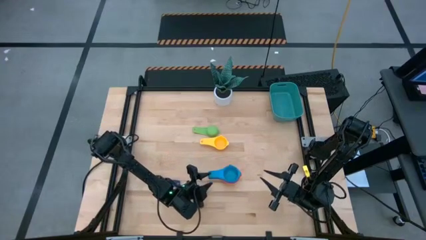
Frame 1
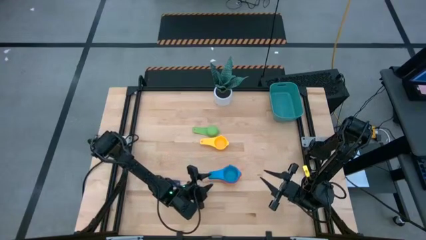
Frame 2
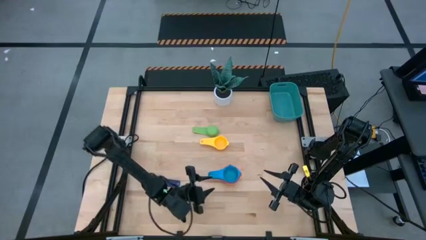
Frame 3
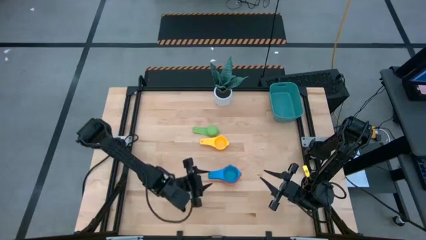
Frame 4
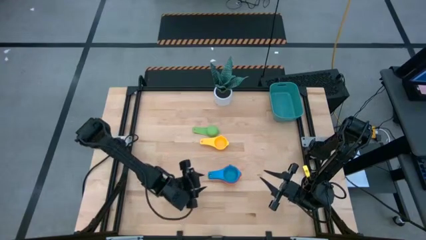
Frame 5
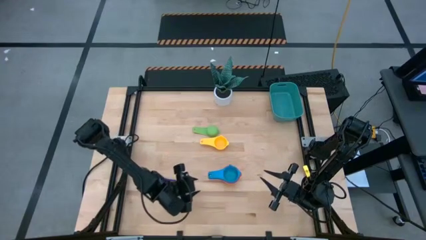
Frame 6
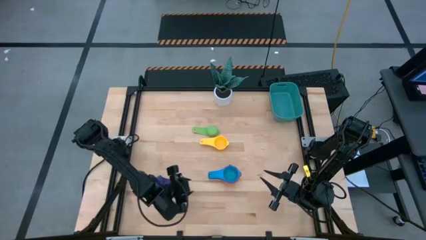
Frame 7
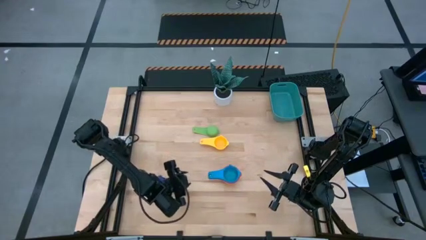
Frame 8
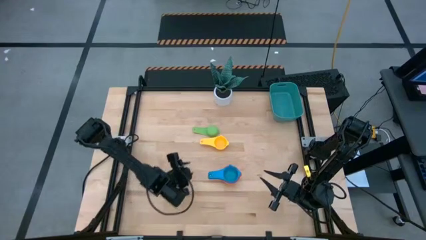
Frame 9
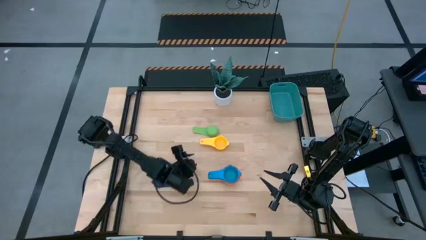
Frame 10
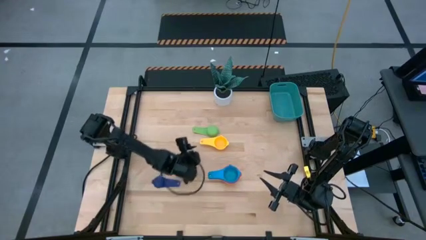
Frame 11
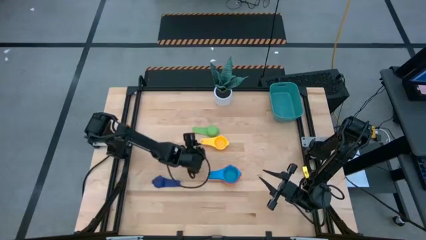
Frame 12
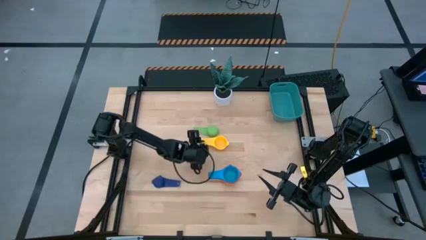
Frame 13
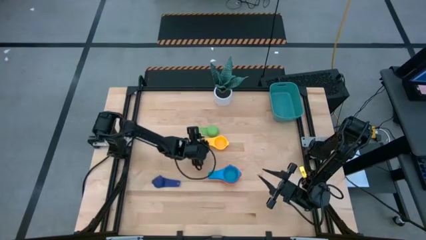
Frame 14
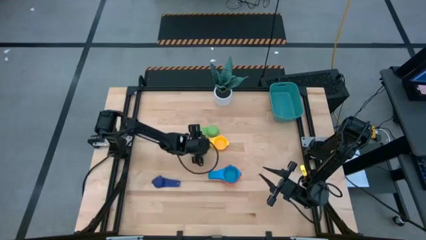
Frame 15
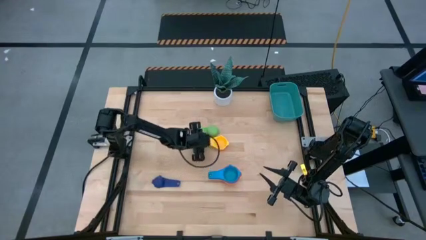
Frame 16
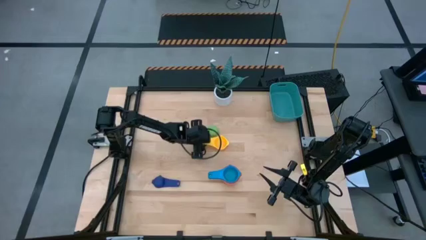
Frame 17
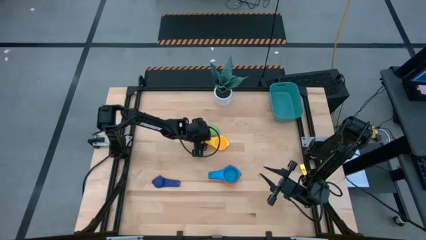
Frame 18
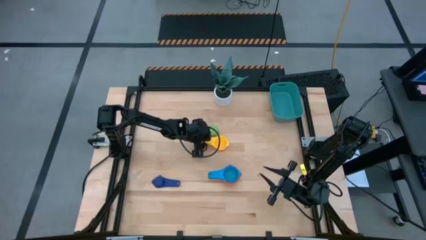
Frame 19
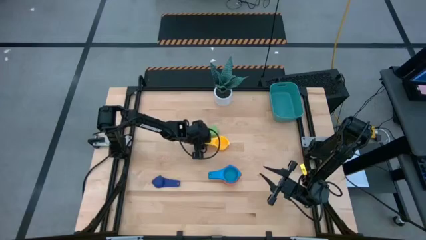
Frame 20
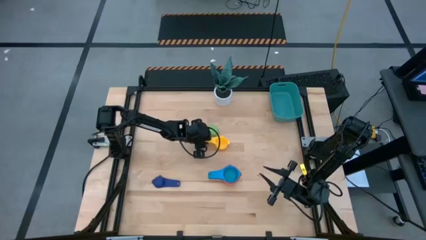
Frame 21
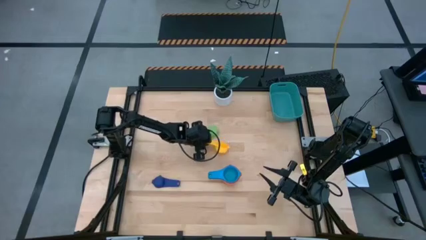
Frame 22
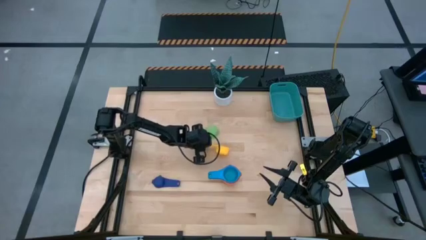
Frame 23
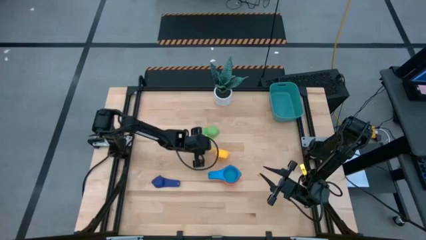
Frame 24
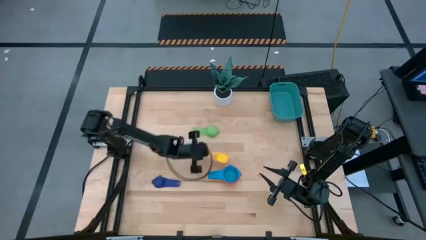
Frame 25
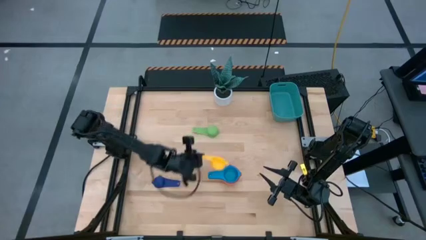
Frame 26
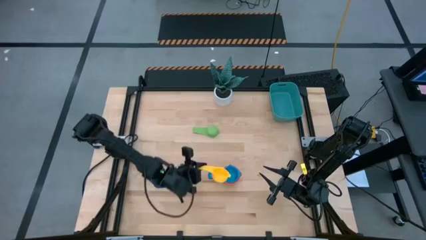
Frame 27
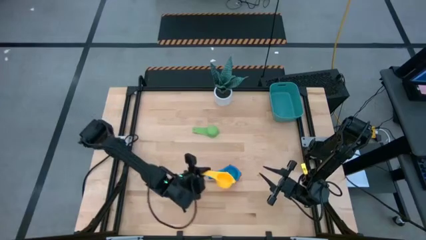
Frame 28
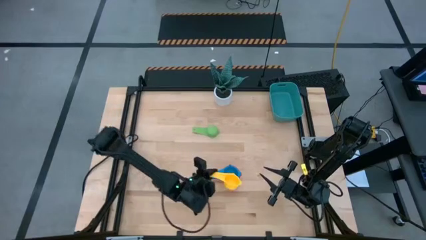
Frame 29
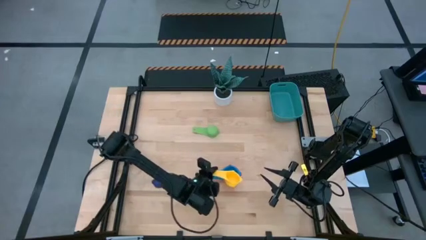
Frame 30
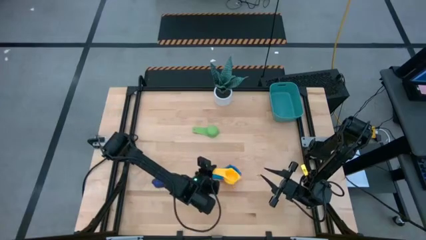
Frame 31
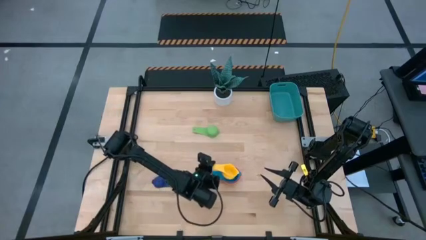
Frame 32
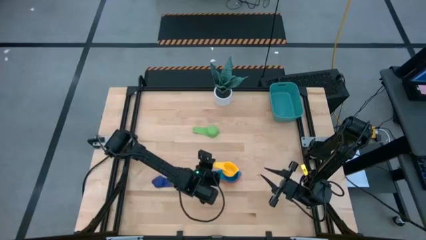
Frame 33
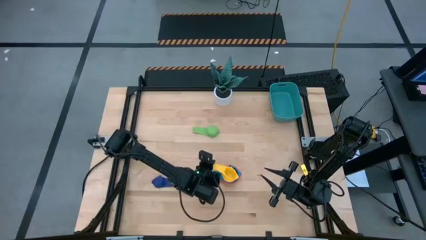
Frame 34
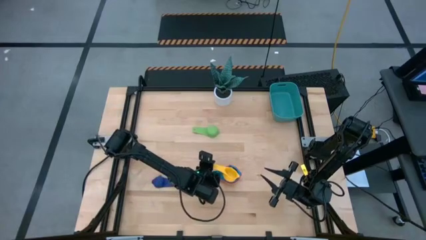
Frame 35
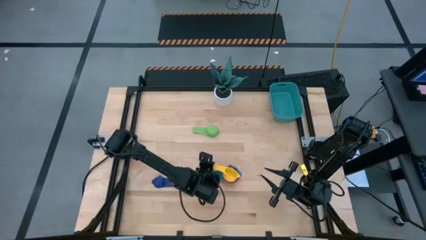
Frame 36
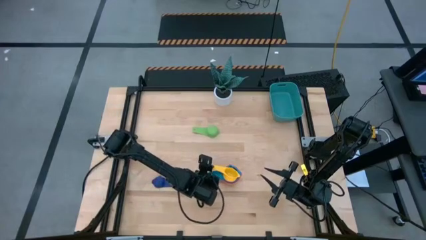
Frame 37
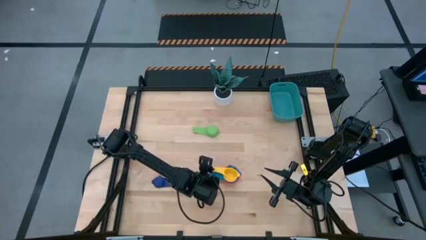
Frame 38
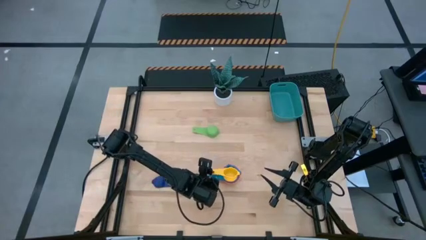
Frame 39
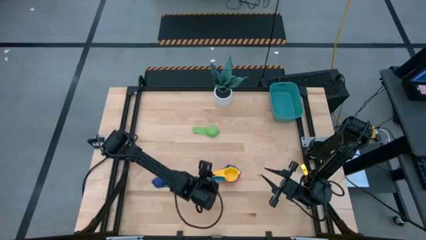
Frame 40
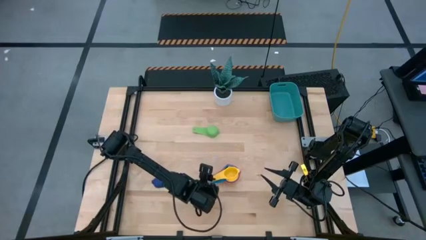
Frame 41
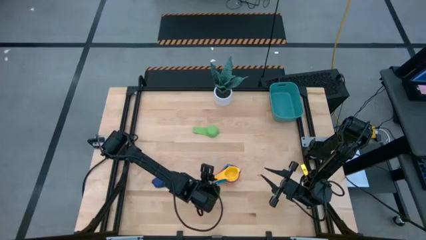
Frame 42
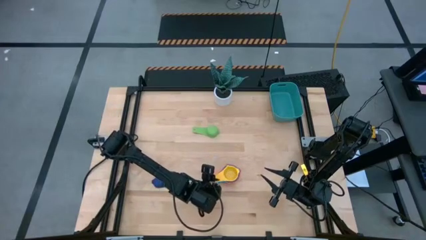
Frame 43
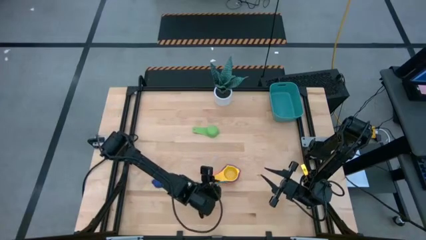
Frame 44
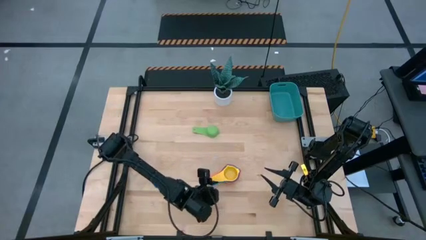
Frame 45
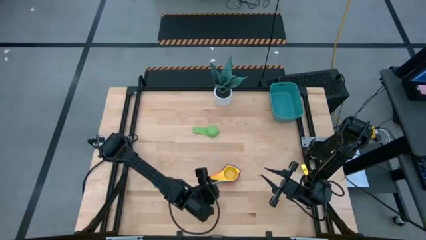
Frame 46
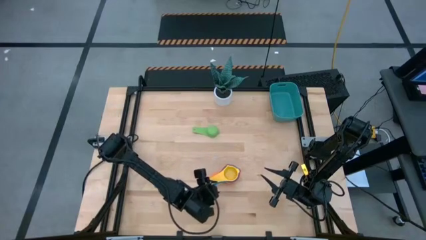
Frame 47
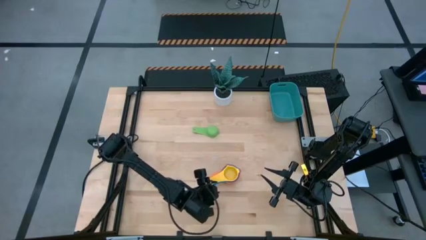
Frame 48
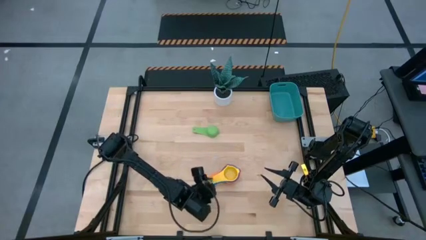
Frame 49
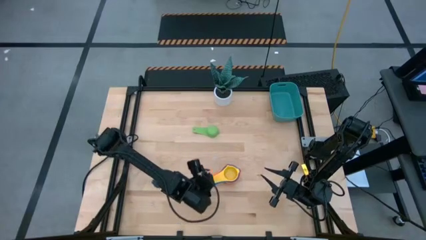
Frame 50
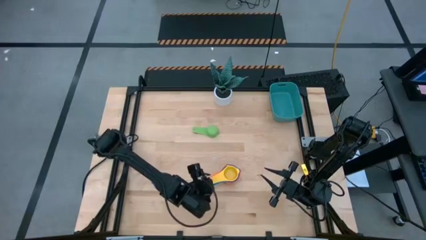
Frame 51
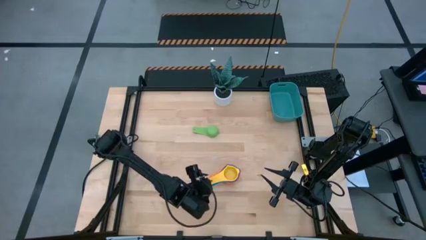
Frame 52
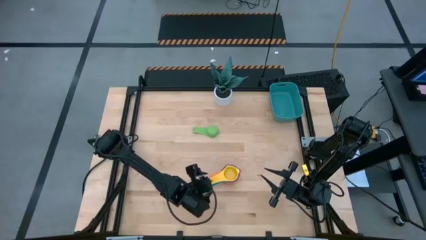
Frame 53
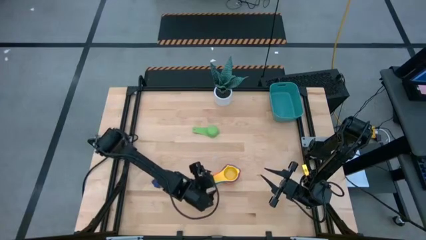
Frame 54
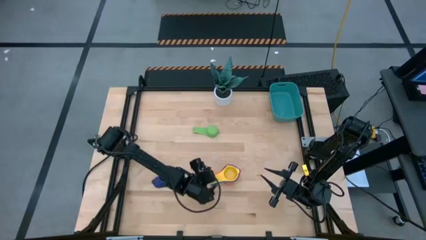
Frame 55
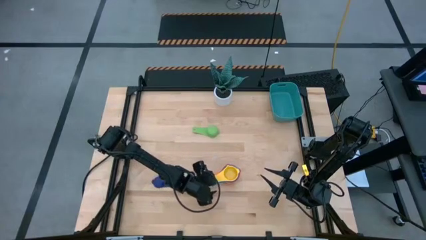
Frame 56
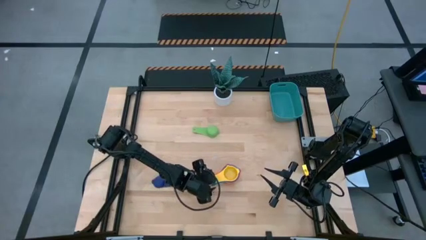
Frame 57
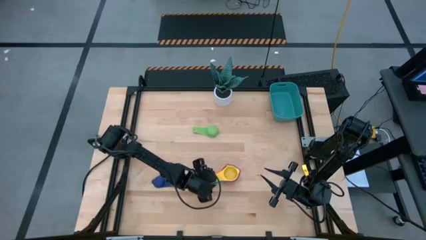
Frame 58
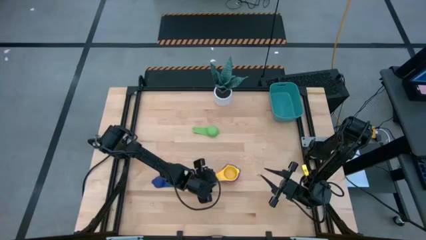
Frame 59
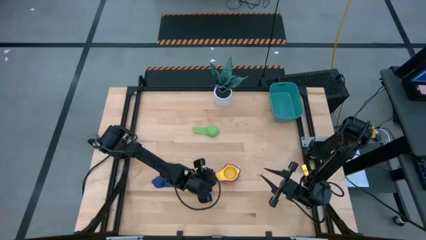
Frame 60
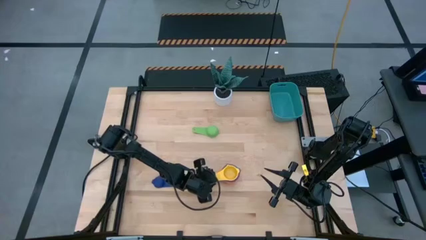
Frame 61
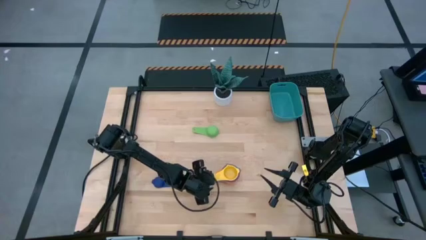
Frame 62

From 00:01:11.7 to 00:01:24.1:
Task: Nest measuring cups in basket
Stack the yellow measuring cup on top of the light blue measuring cup

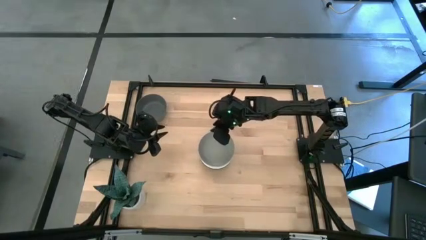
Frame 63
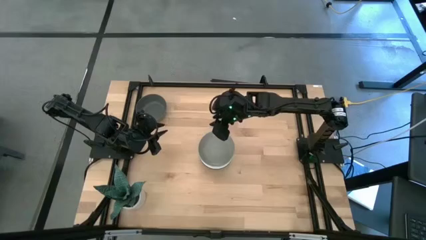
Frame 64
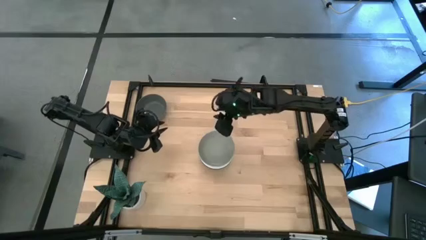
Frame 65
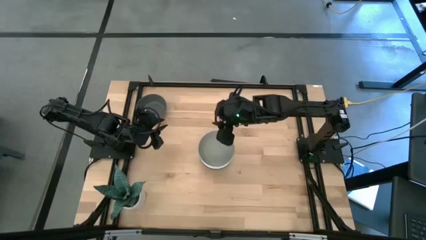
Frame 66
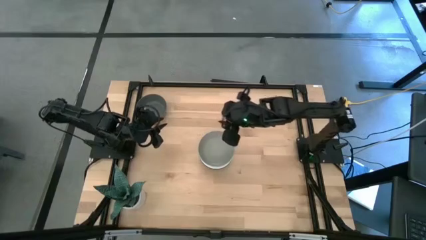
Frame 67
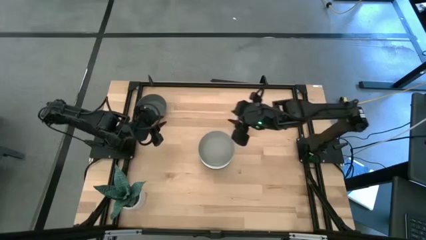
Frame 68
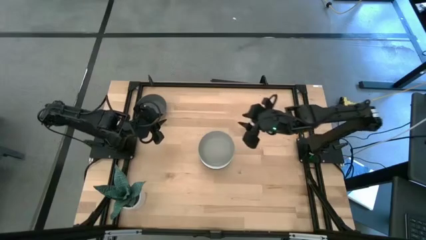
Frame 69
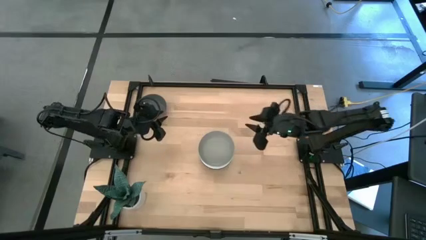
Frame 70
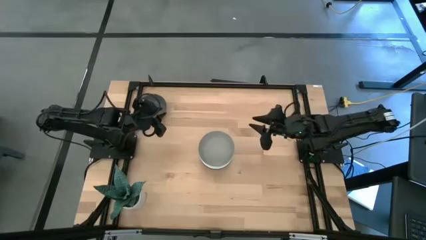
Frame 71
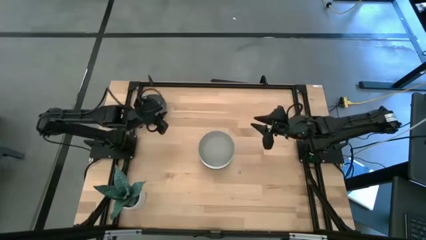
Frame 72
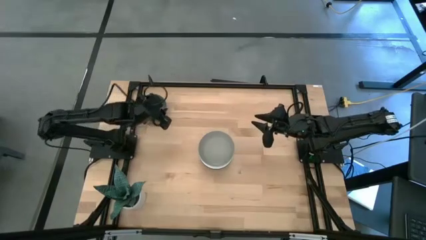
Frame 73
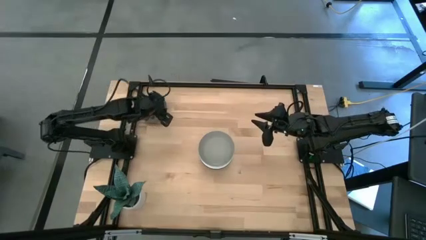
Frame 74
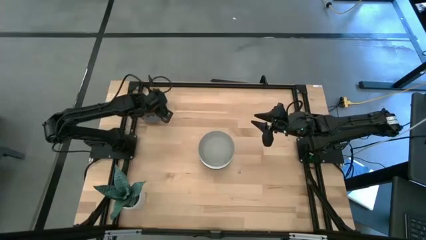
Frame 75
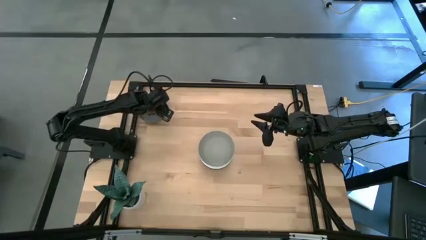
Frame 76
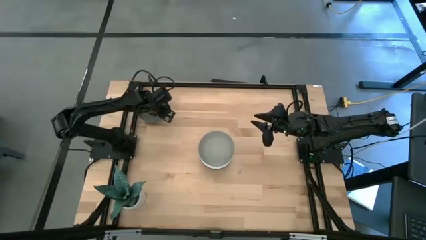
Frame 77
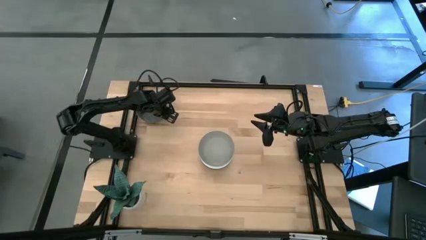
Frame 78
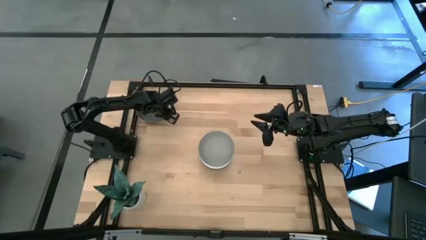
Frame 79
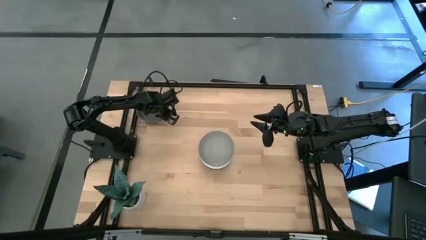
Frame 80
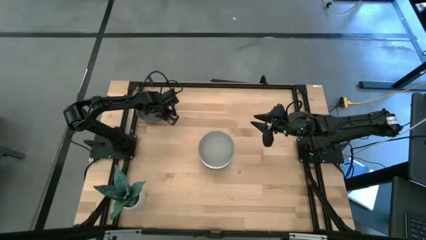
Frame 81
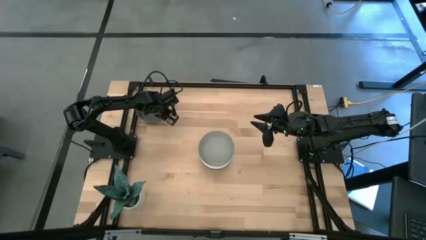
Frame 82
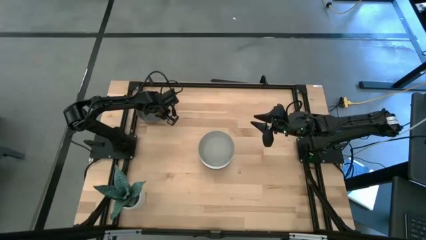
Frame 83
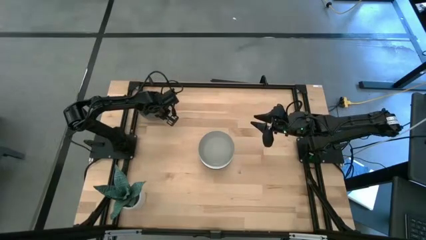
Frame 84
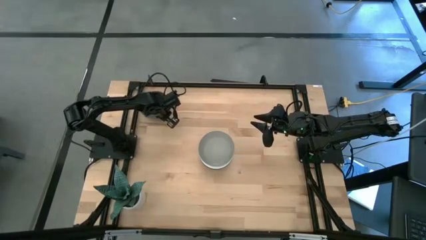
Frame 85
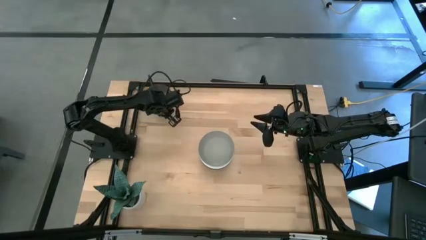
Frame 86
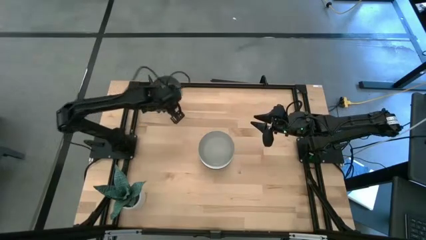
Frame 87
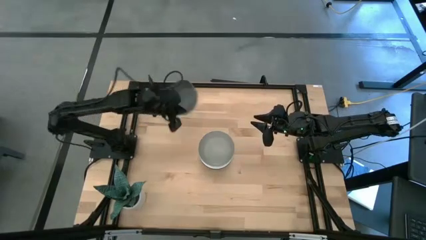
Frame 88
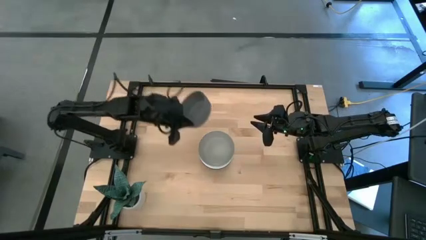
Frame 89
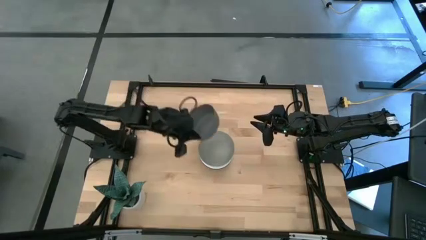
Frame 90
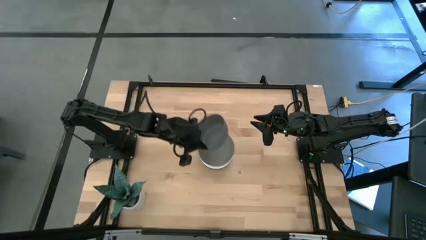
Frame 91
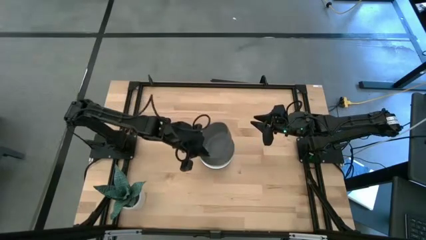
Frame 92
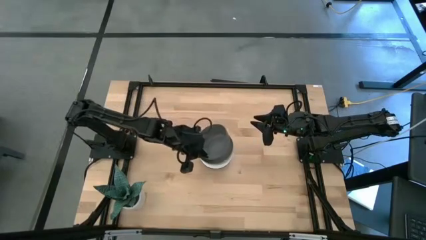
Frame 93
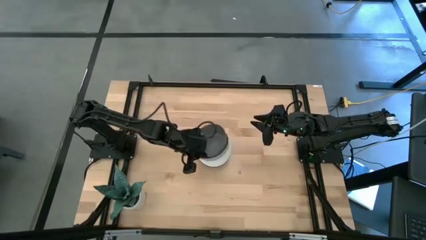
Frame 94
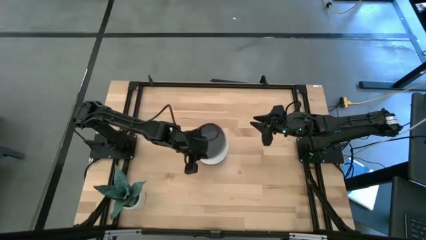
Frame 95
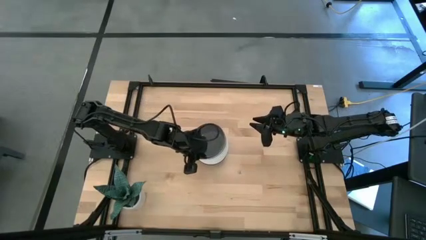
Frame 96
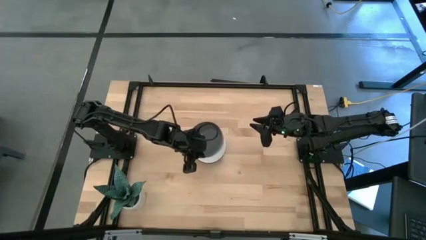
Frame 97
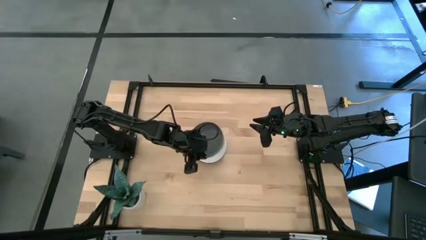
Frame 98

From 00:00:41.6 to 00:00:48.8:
Task: Nest bowls inside each other
Stack the gray bowl on the top of the light gray bowl
